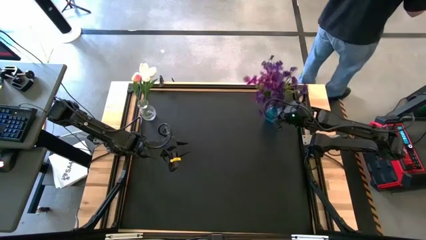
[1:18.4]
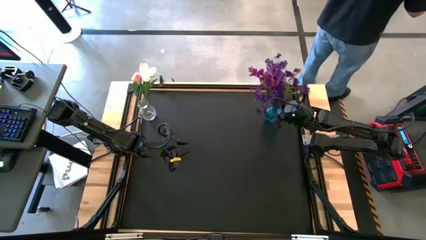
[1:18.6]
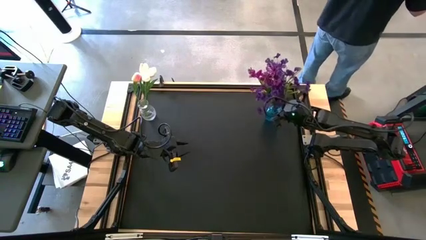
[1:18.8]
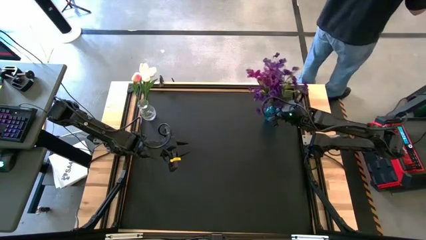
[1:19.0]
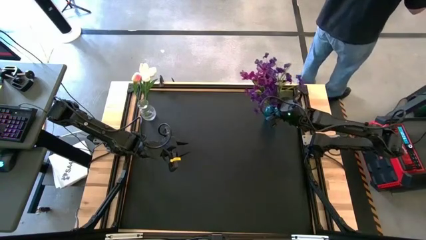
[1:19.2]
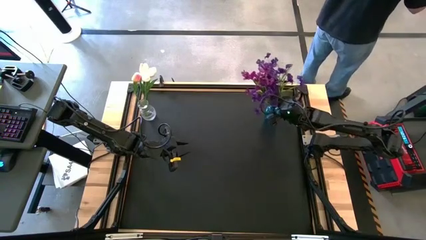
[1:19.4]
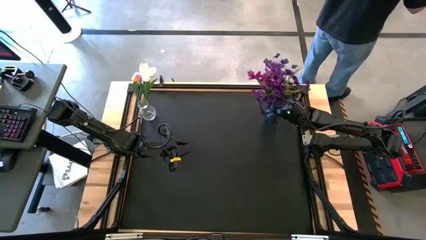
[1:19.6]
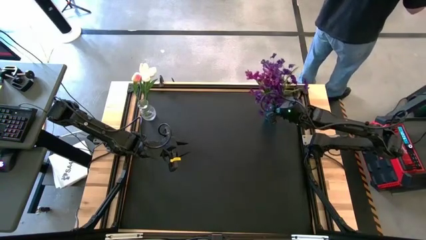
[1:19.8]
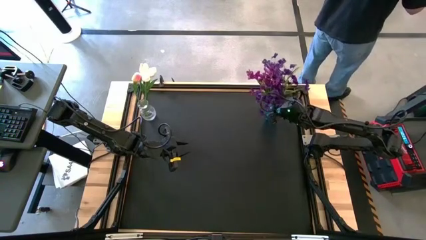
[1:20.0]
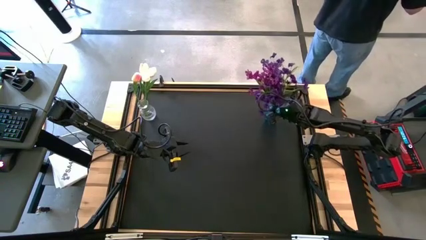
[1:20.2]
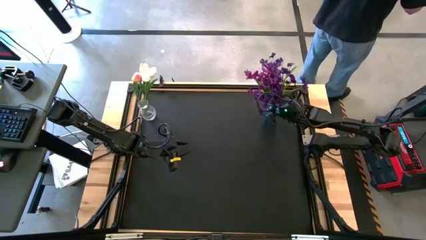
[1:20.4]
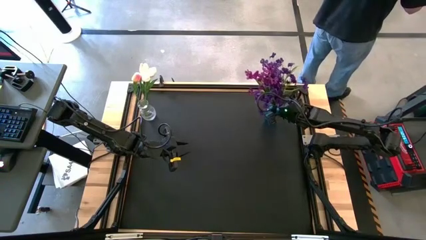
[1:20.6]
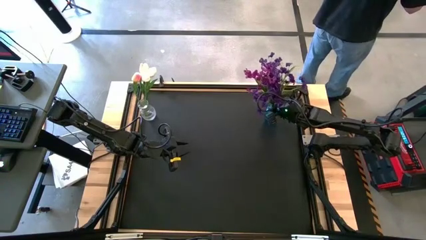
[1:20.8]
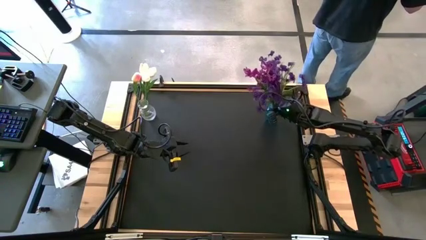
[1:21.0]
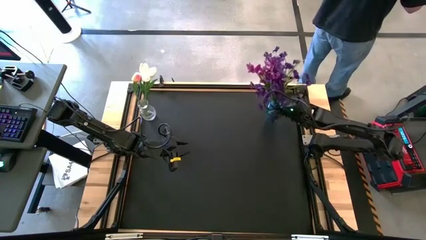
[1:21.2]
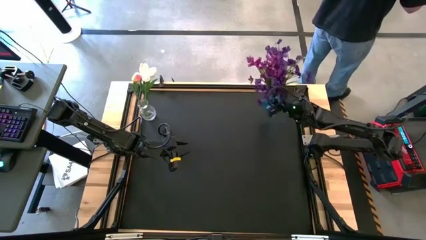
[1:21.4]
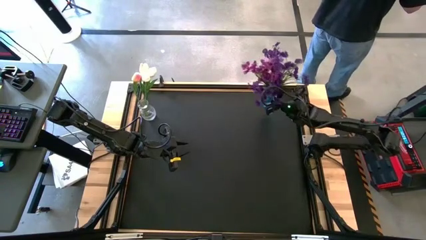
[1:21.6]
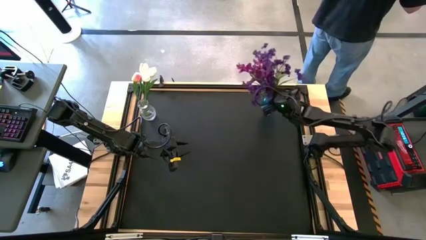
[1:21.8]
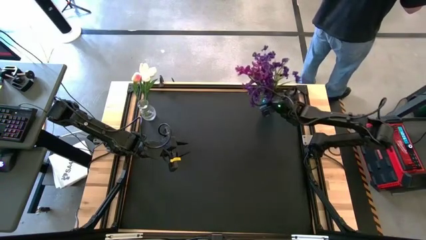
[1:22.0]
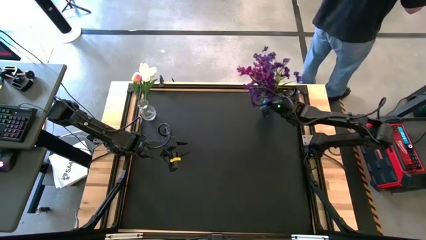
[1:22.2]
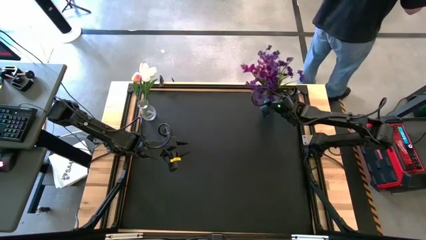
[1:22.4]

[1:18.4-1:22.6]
Task: Sort flowers into vase by color
Move the blue vase to the top right of the table

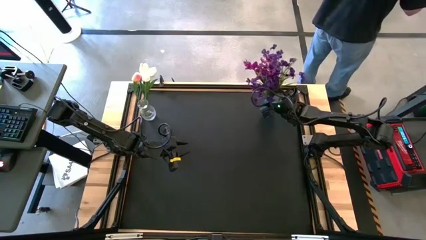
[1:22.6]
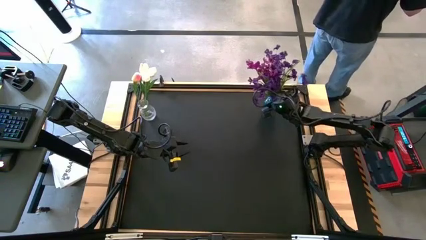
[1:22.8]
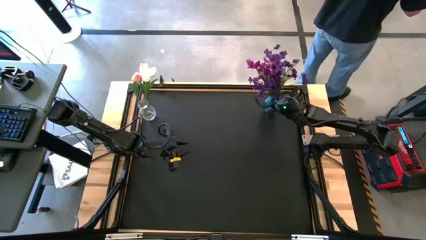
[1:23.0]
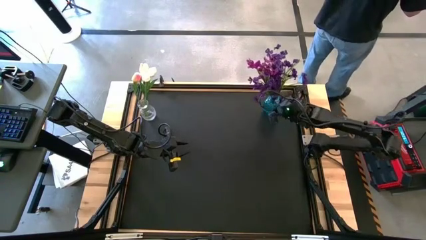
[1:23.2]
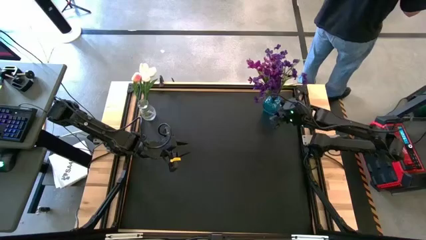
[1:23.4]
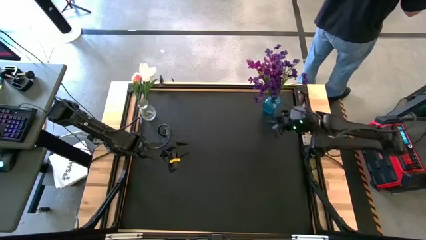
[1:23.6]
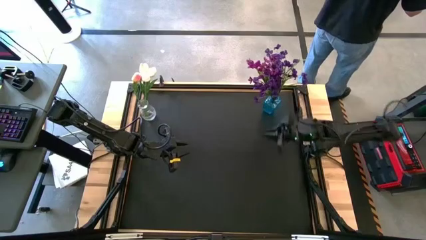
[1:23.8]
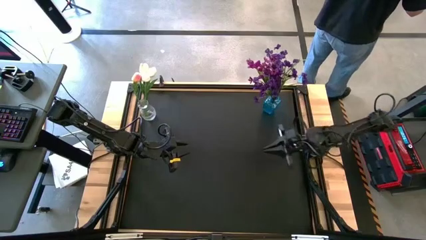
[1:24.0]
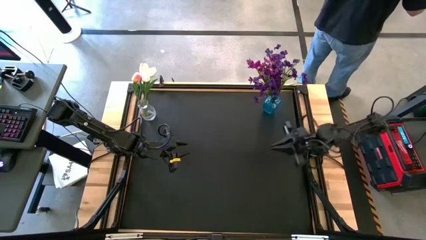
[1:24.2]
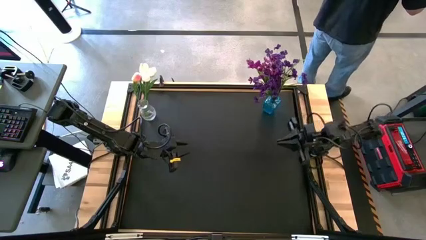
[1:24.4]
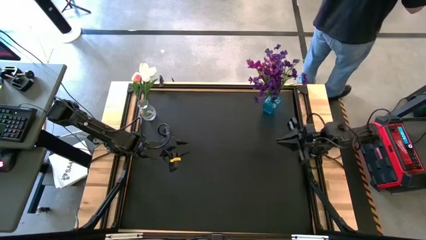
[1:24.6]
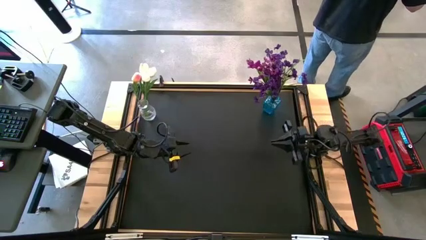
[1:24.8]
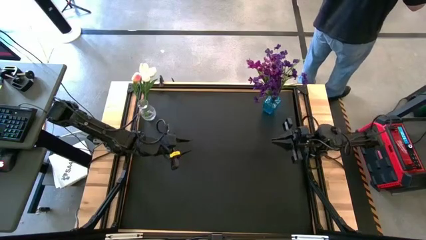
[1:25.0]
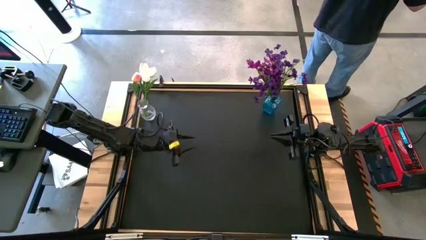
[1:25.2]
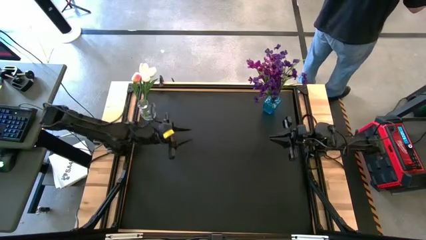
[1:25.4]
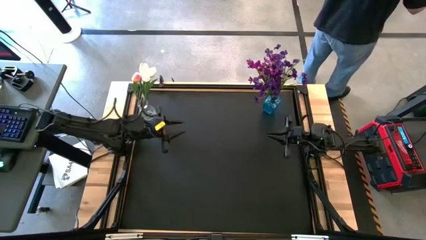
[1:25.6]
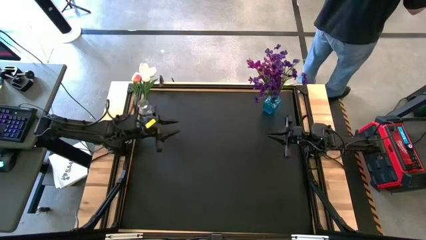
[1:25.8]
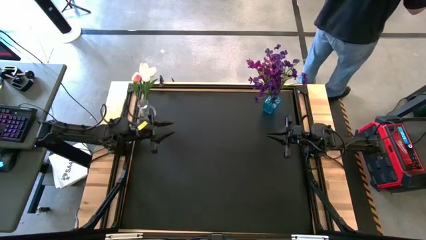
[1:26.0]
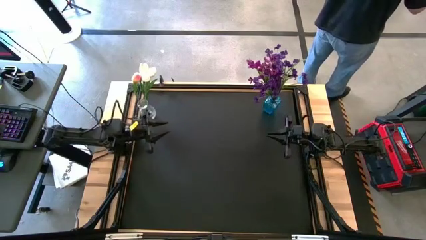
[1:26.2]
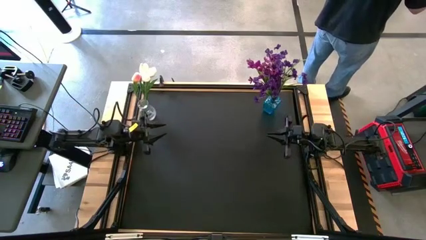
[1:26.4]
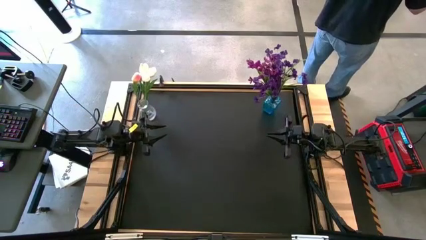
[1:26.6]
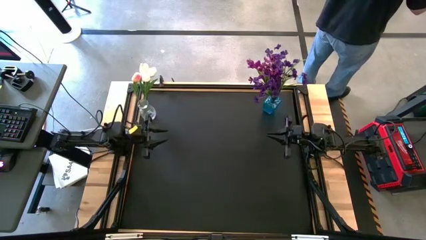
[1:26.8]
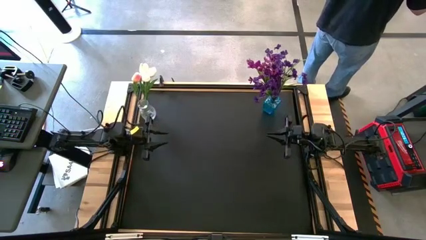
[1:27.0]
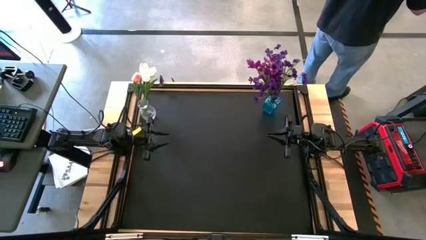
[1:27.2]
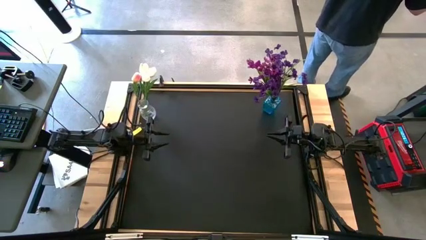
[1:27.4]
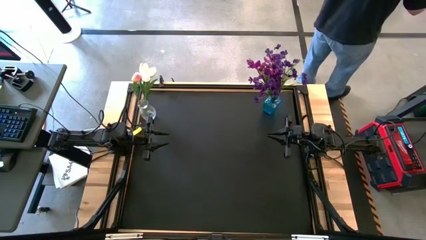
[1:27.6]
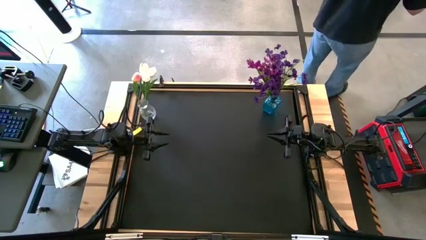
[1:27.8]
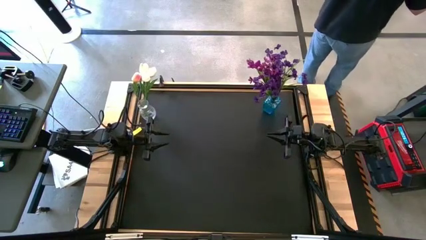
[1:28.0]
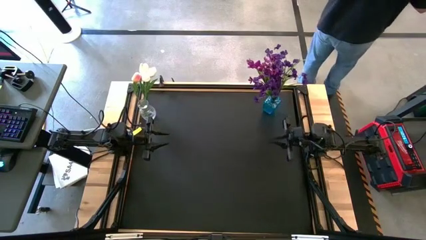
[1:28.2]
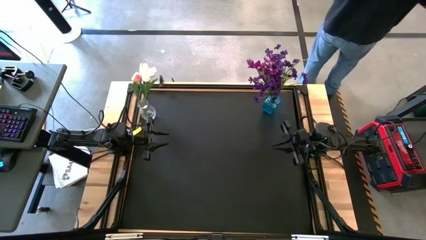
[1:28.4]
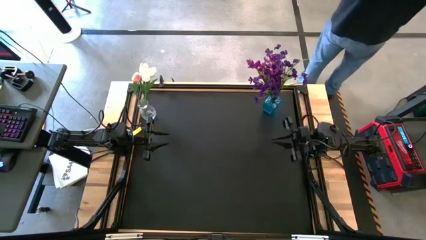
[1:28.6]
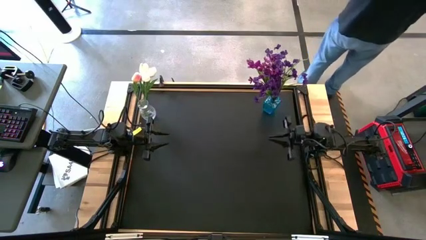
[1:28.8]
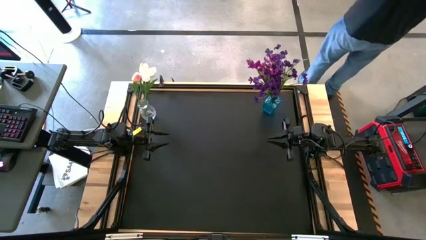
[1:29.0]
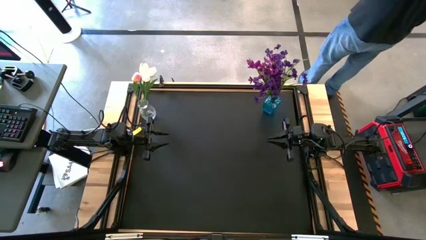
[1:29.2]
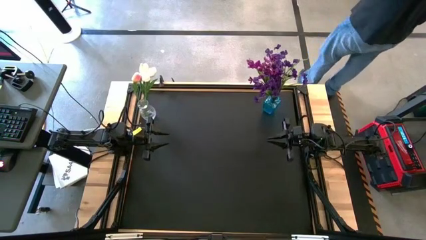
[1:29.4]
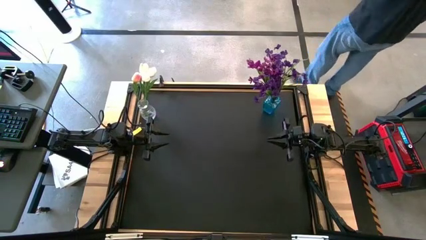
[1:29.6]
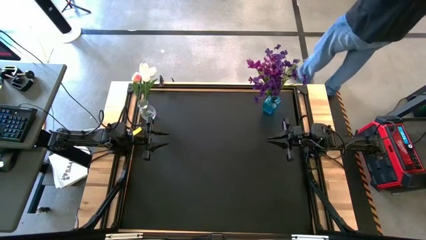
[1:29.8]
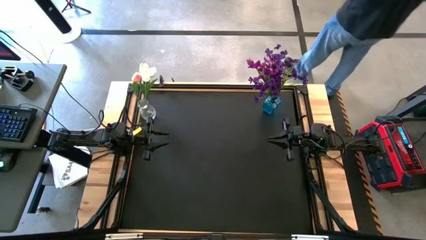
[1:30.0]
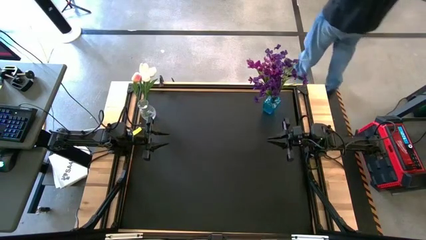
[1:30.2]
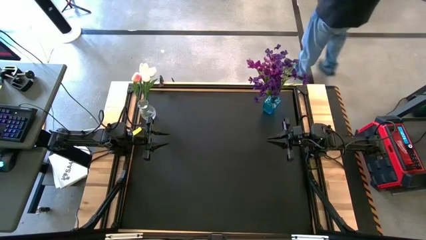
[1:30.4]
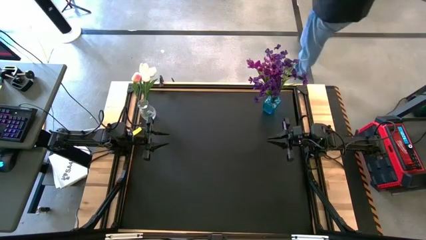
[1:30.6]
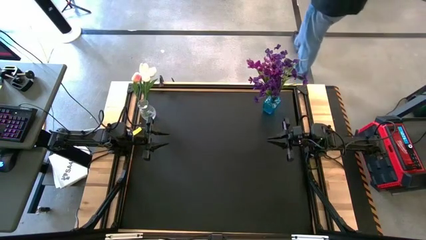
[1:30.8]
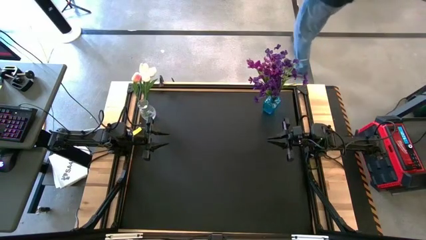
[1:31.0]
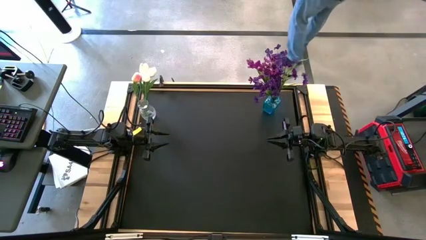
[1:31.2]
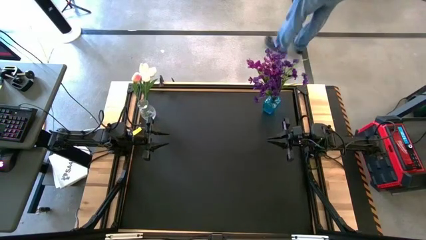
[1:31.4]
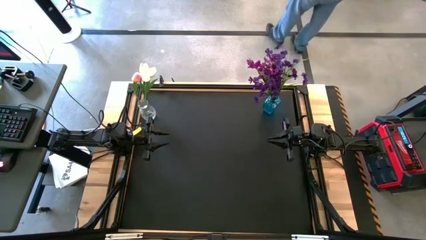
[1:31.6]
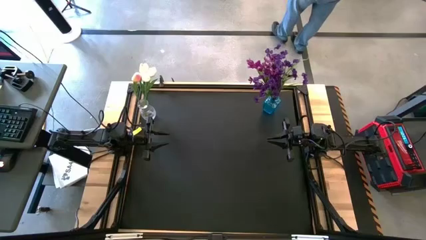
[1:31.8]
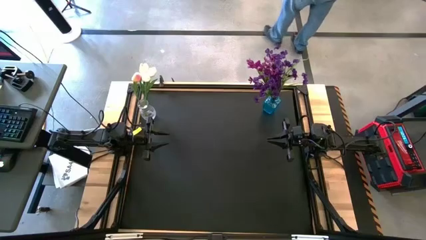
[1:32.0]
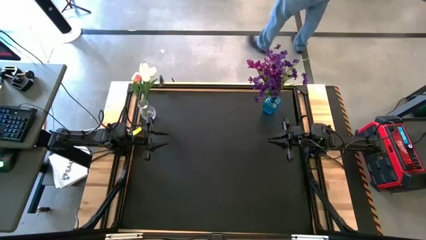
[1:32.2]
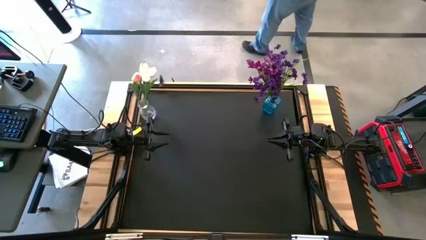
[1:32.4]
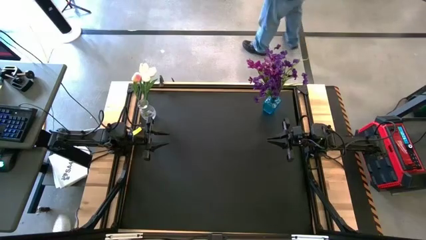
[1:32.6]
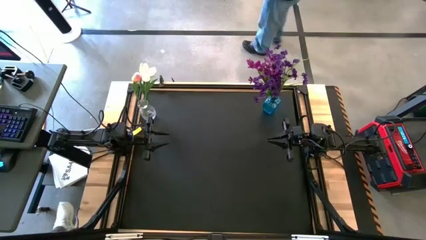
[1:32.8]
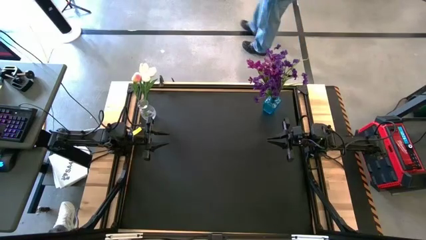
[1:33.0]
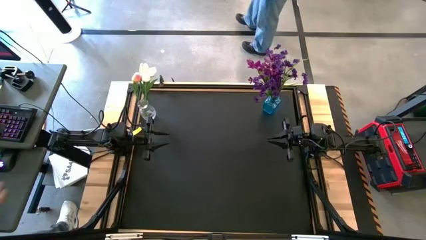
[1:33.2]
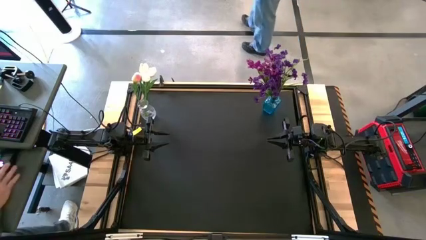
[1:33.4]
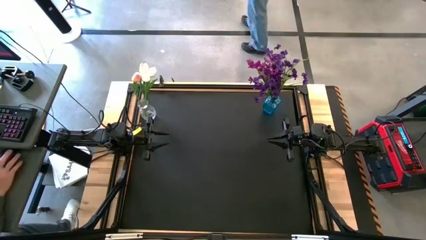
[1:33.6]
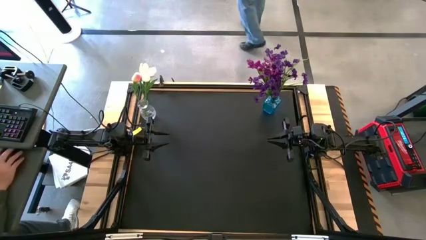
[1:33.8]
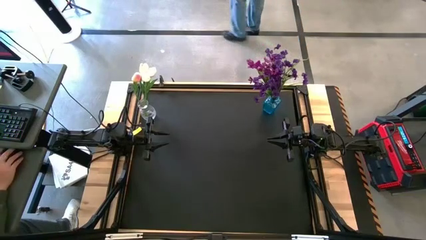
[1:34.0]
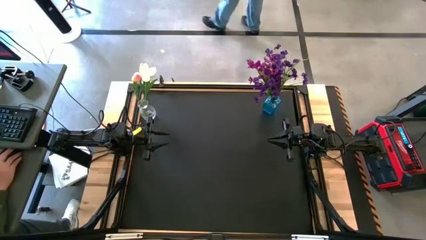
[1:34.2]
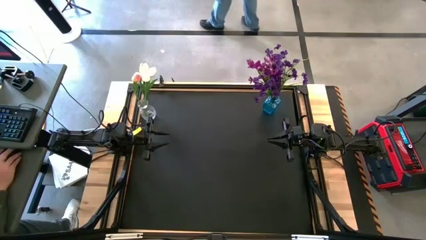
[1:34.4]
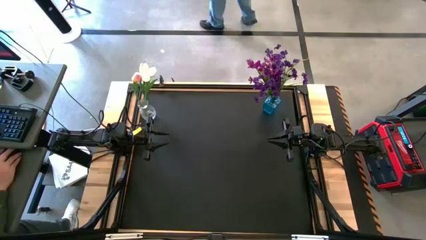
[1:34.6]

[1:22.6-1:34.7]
Return to Home Position

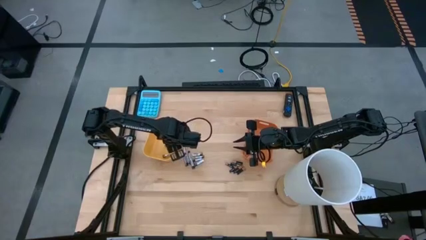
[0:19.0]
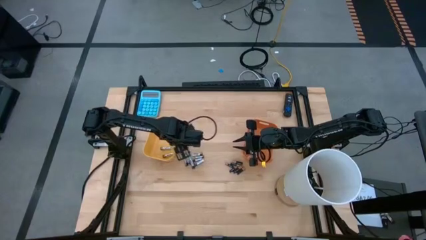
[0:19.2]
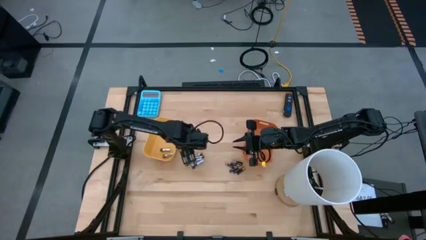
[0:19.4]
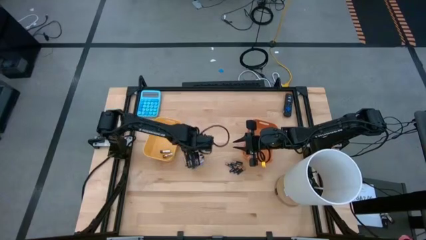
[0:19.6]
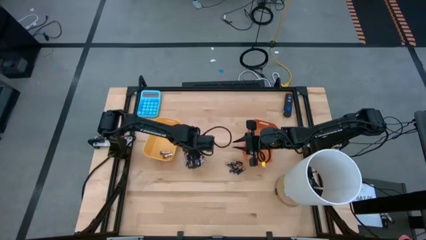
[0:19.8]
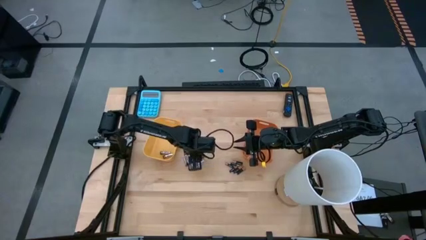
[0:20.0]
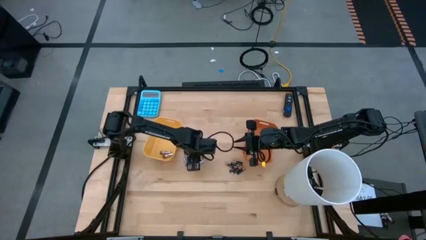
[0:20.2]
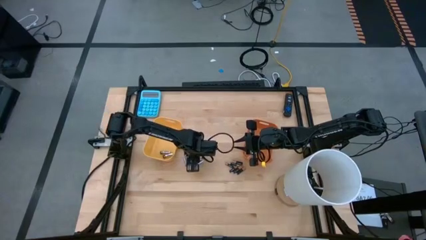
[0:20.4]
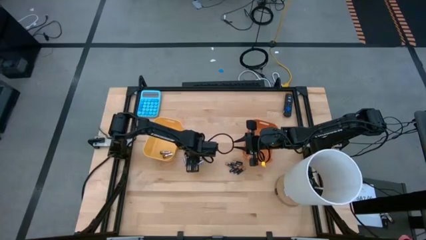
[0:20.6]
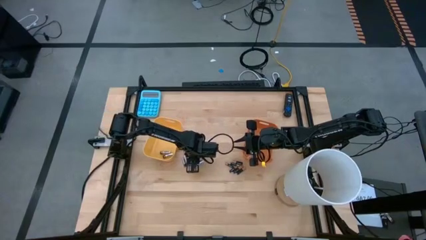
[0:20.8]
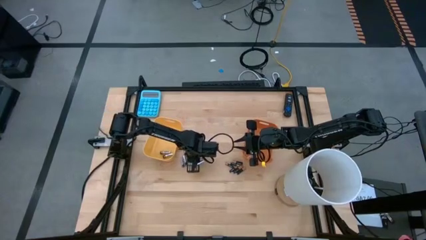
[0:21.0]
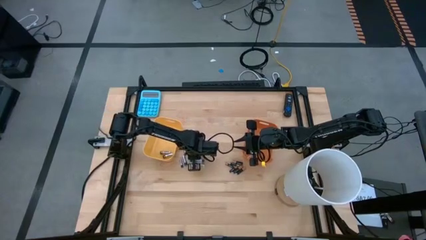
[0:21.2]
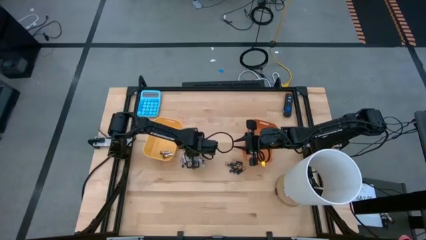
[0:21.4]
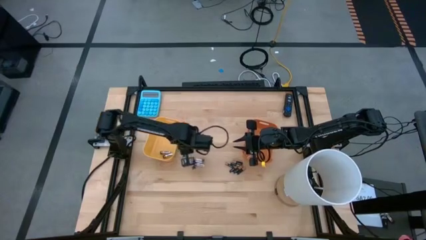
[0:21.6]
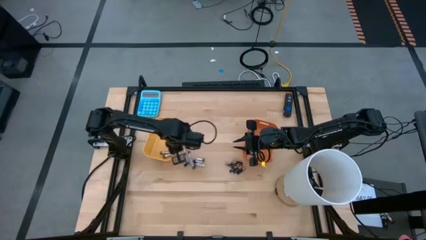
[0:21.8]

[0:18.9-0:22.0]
Task: Sort batteries
Put the silver battery into the yellow bin
